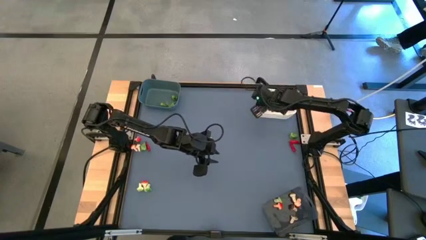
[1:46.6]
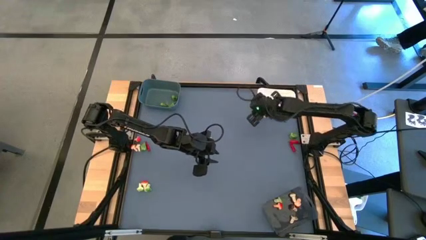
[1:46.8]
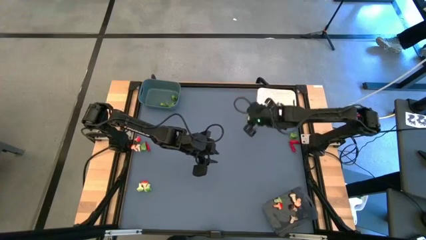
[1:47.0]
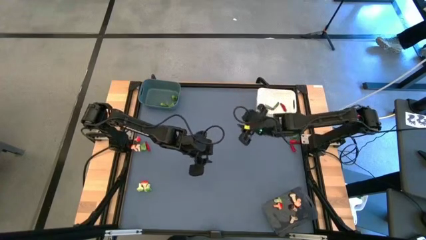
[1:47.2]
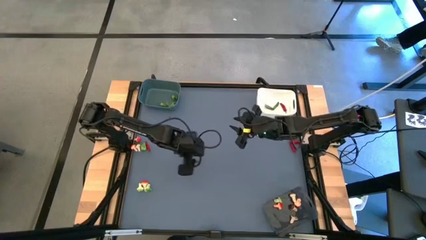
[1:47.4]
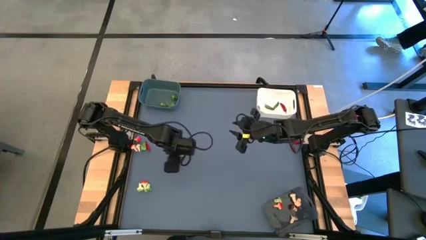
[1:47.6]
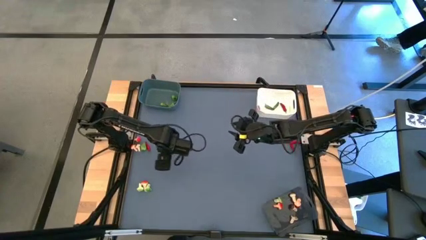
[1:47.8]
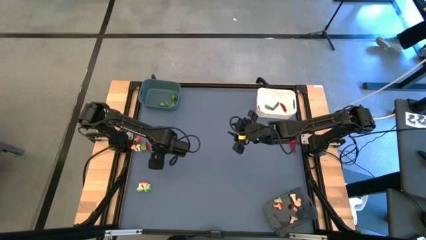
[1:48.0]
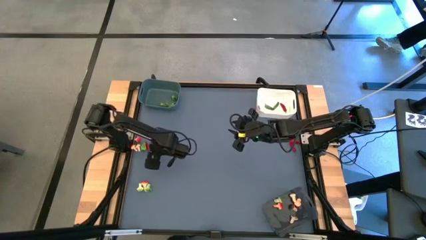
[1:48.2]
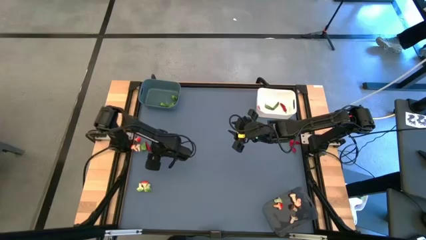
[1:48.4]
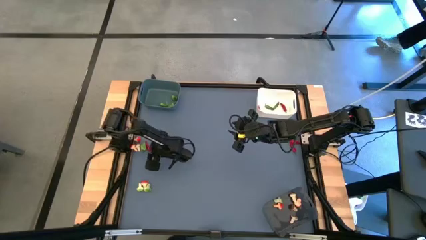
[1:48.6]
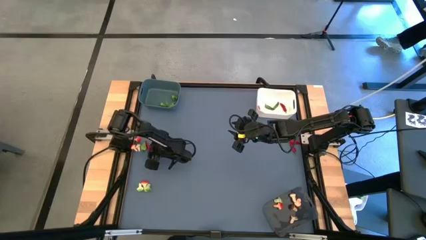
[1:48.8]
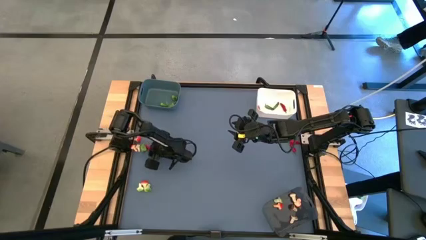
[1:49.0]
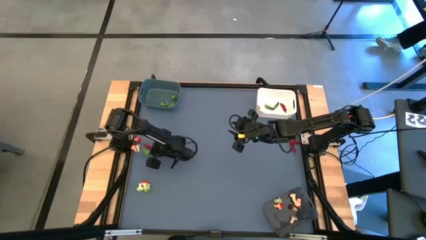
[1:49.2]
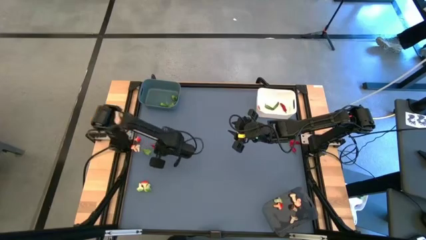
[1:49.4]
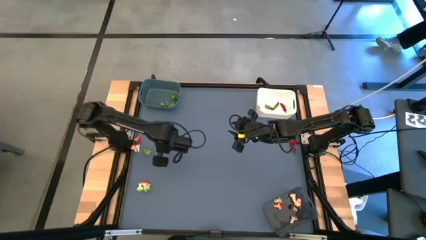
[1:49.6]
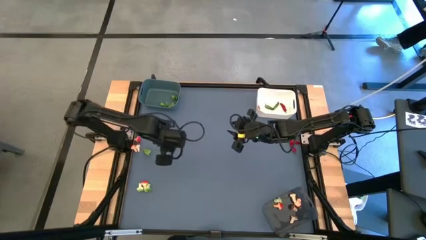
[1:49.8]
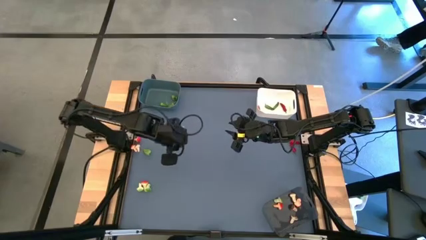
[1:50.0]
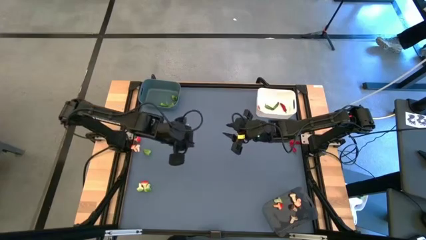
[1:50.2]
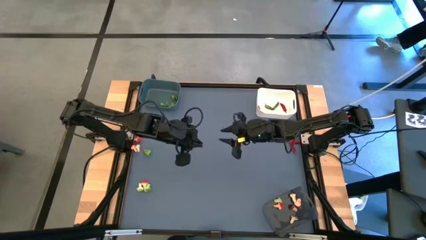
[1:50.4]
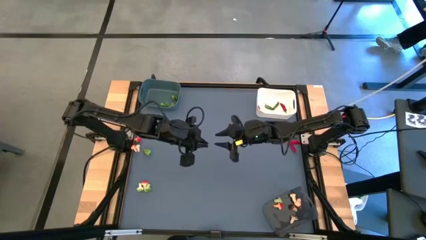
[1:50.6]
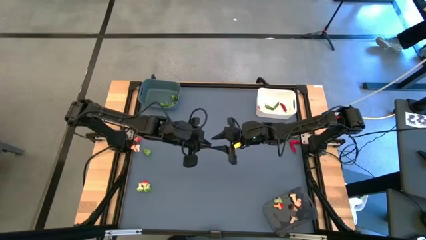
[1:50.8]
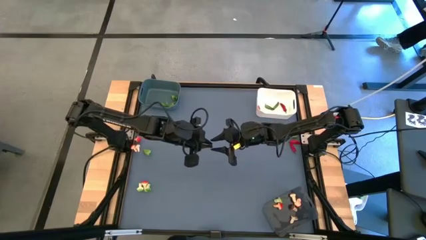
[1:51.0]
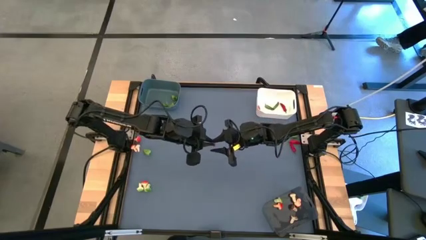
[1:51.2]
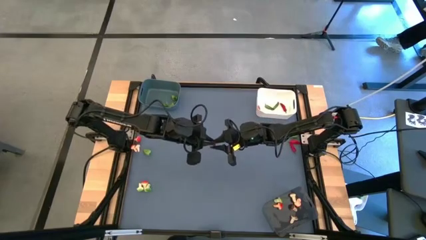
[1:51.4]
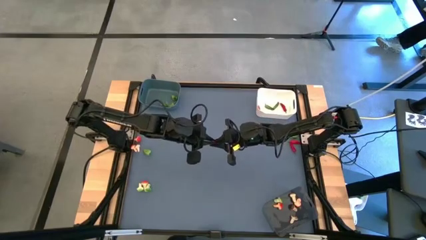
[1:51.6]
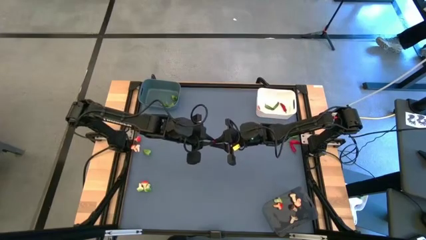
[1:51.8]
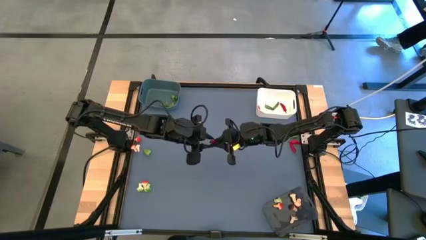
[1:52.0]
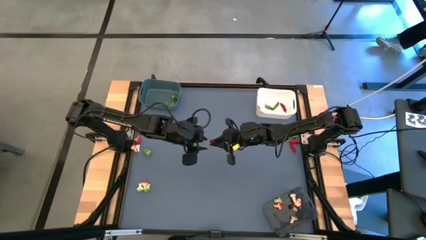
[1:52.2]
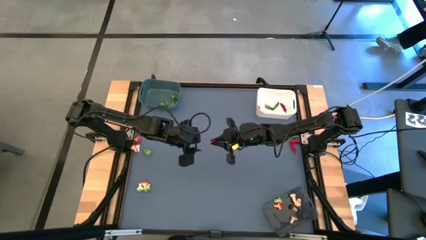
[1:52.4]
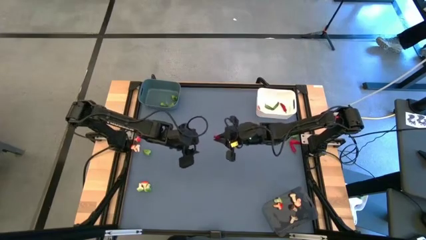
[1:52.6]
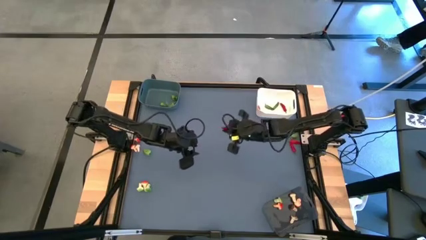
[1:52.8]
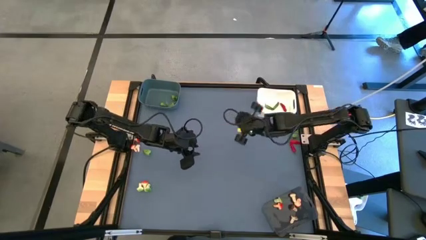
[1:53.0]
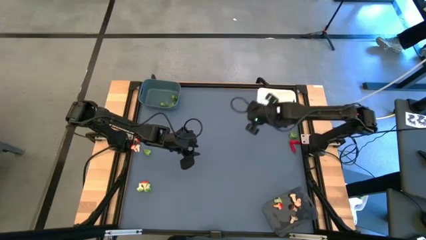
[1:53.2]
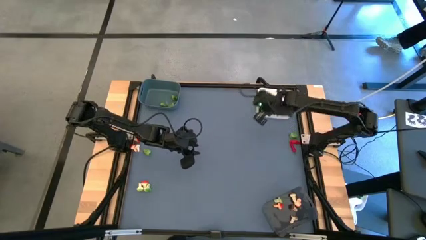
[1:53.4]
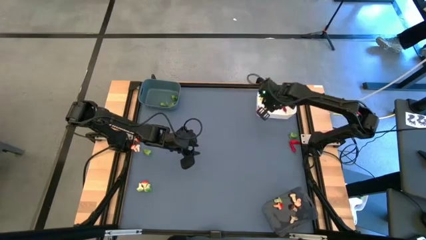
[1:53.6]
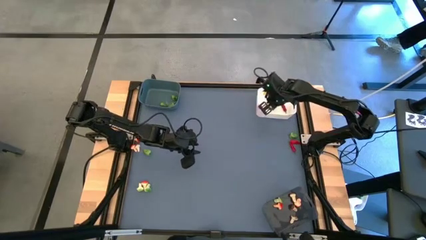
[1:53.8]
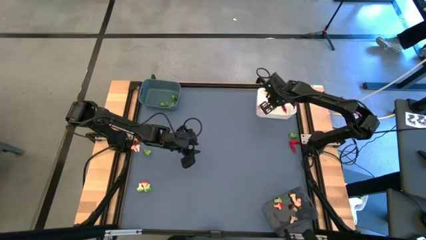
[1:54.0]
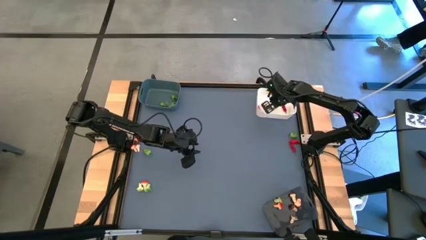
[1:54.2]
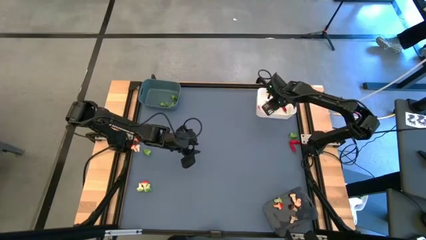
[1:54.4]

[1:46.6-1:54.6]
Task: Sort produce into baskets
Put the red chili pepper into the white bin

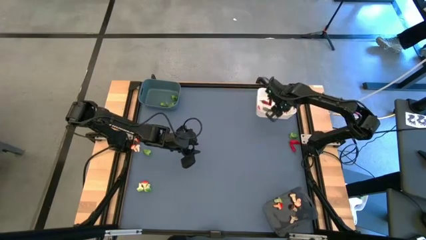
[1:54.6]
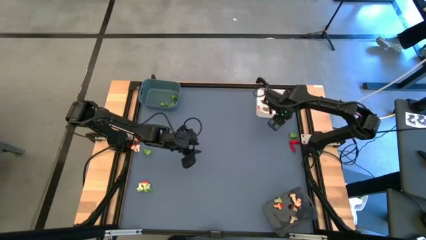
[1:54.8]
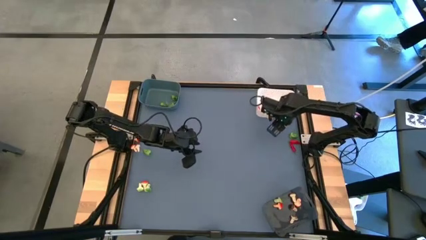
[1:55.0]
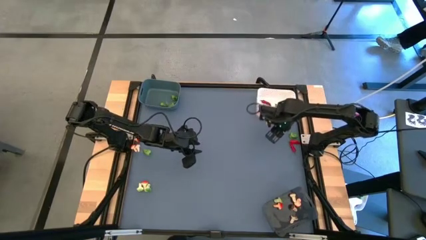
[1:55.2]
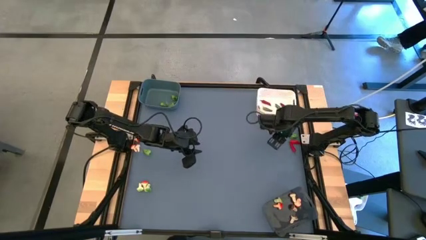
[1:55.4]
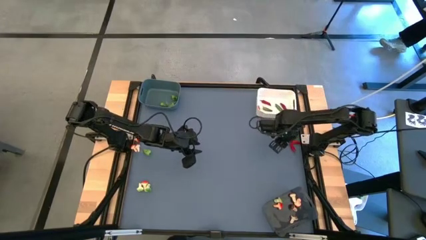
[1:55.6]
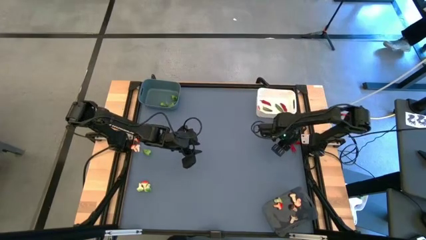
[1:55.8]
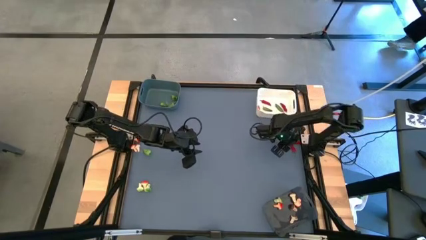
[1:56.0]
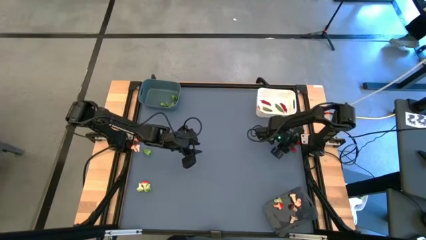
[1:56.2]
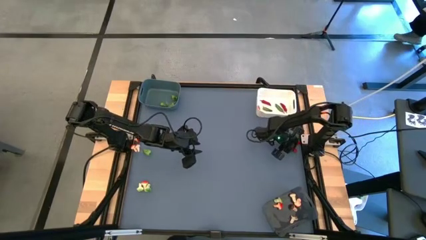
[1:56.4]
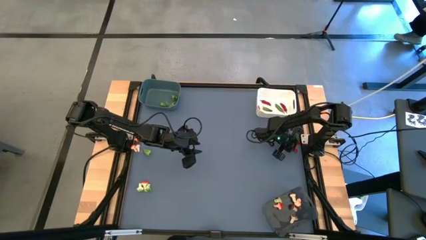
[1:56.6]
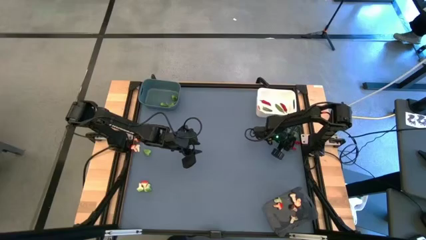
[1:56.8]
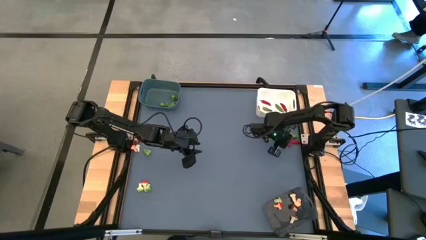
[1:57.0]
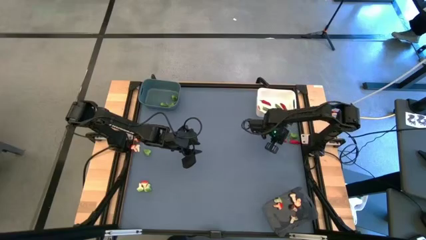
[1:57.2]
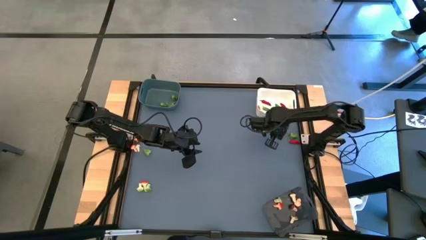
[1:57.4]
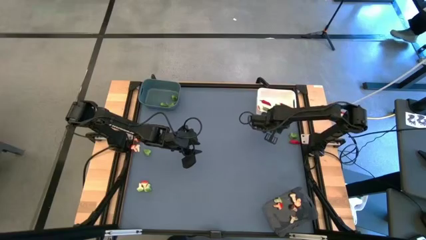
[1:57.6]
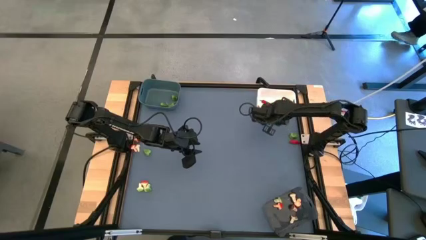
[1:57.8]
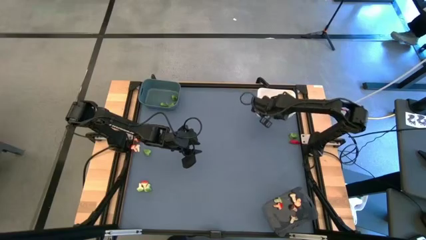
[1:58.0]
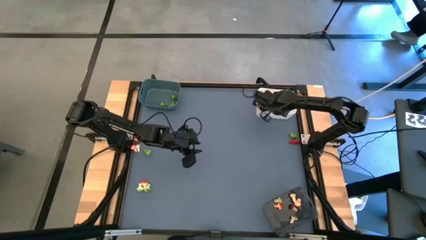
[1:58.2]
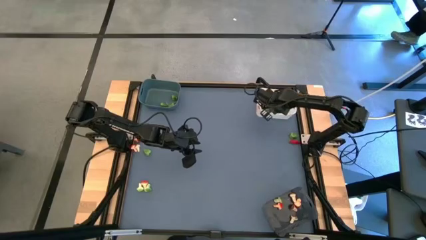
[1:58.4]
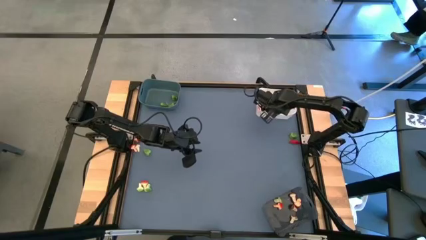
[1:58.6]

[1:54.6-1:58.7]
Put the red chili pepper into the white bin

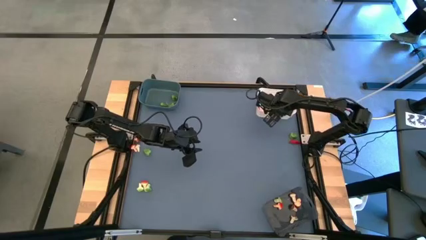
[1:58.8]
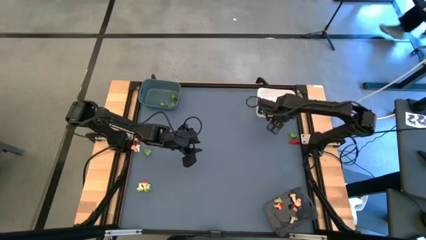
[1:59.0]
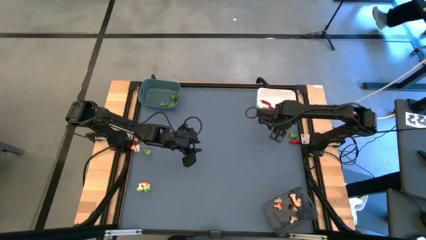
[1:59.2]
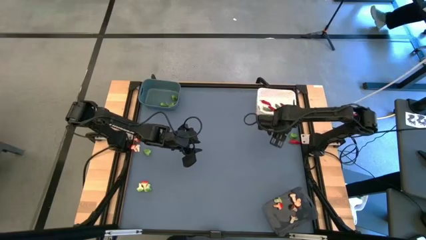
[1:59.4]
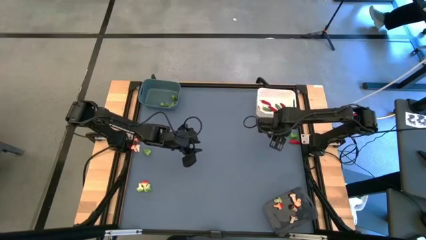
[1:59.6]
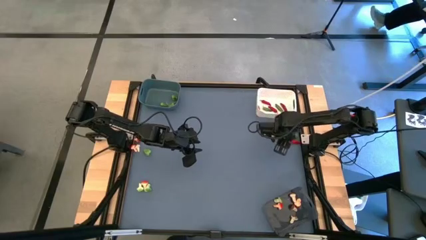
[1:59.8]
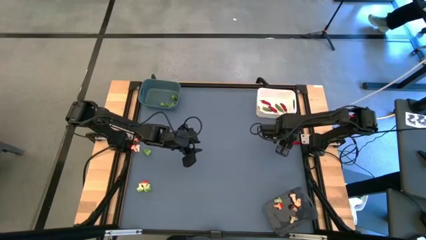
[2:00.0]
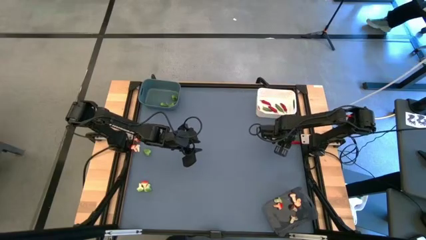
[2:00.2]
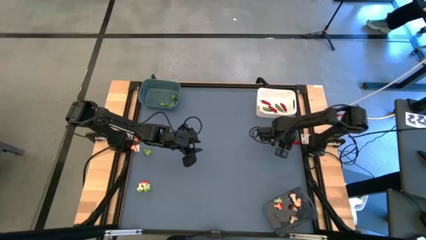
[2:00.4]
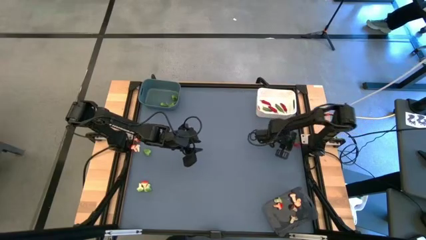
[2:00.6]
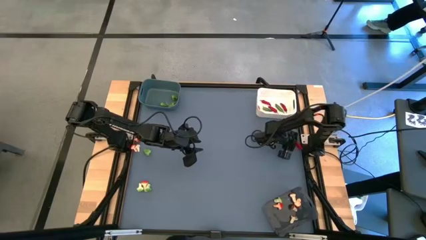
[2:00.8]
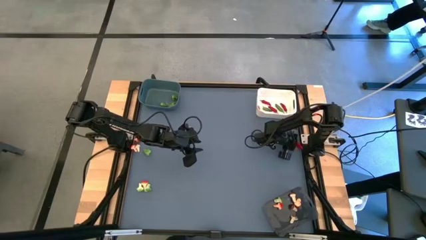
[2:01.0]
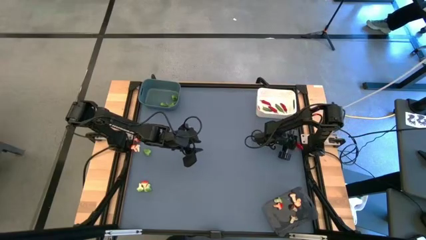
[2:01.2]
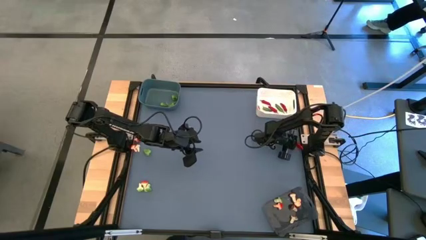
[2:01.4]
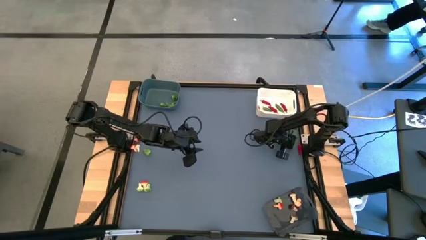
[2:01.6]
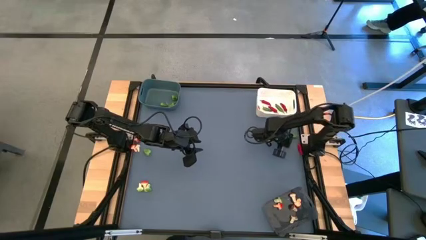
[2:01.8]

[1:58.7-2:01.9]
Put the red chili pepper into the white bin

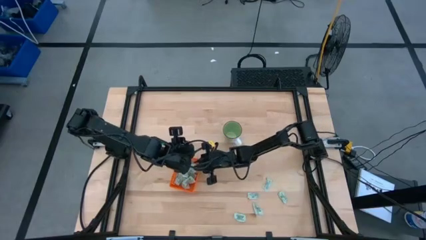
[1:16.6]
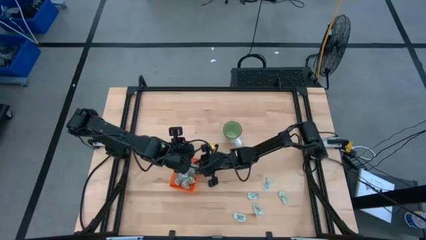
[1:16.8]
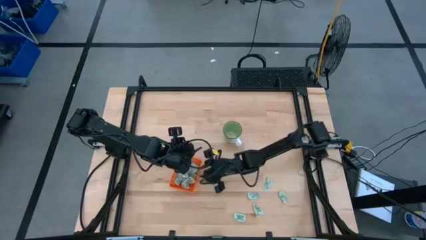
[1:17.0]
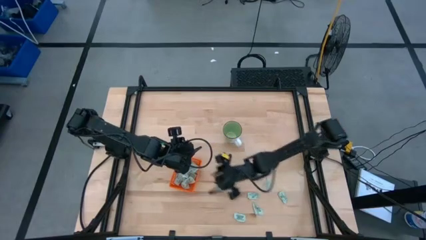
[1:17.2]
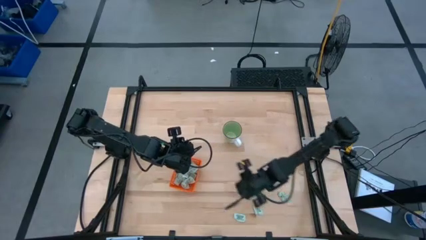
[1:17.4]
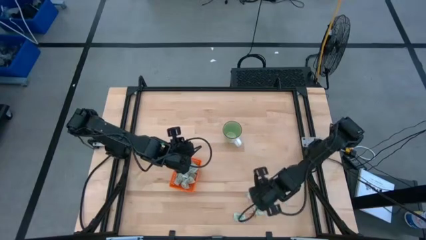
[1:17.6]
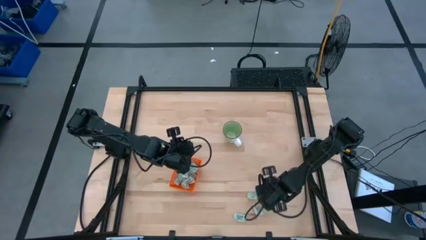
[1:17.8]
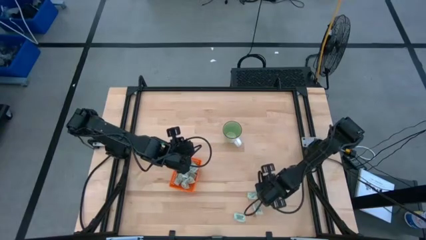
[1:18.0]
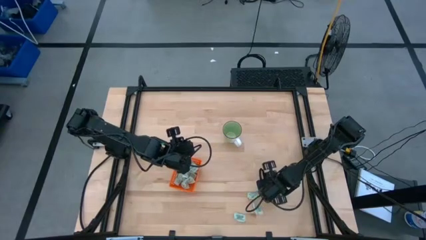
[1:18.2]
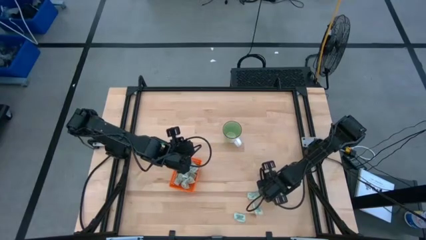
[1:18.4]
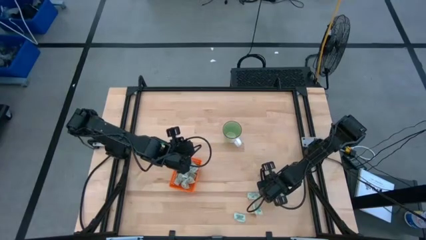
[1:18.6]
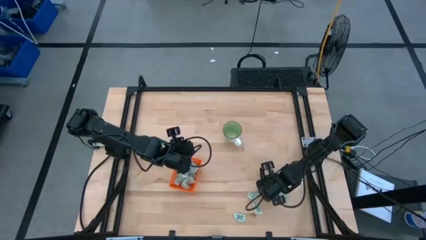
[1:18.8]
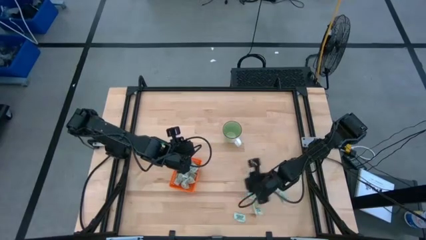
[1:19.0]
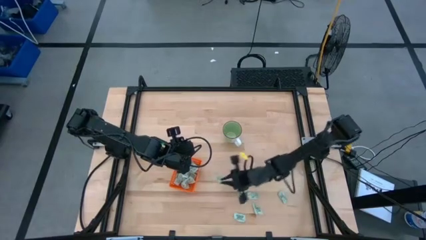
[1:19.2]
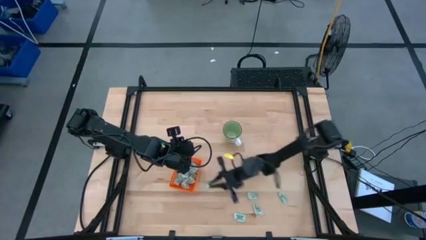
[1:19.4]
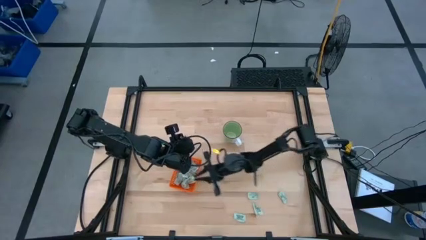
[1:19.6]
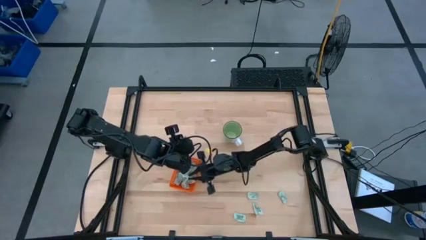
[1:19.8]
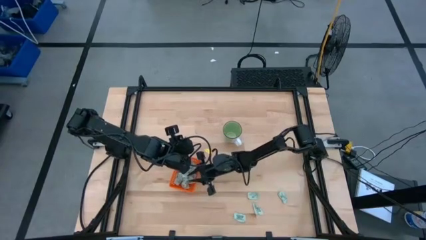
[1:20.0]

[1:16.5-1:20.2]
Task: Pick and place Stevia / Truvia into bins
Put the light green stevia packet into the orange basket
